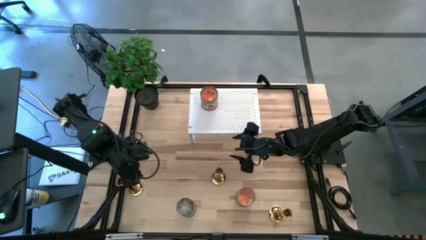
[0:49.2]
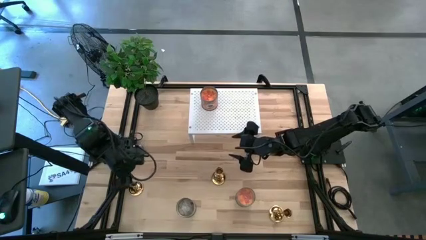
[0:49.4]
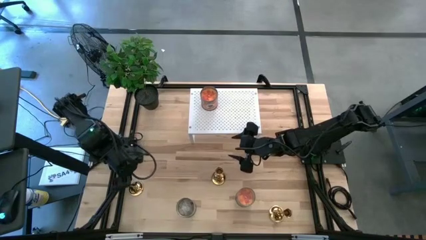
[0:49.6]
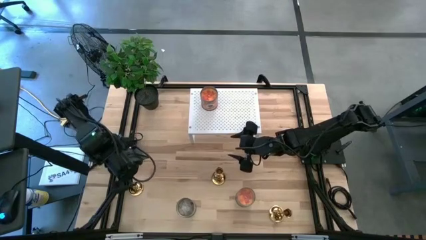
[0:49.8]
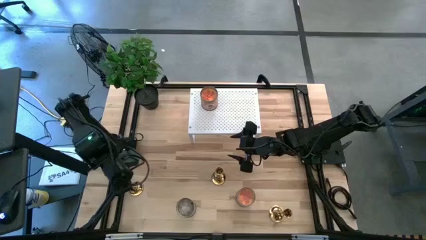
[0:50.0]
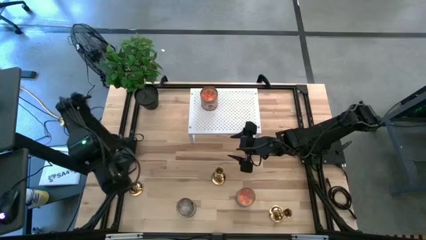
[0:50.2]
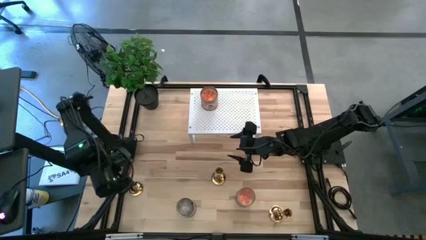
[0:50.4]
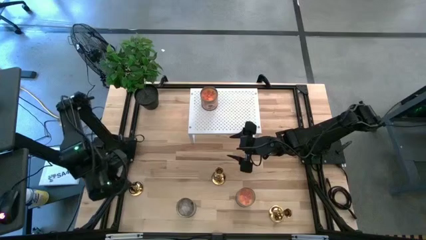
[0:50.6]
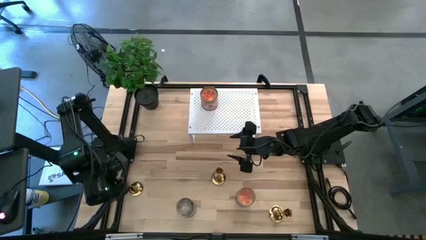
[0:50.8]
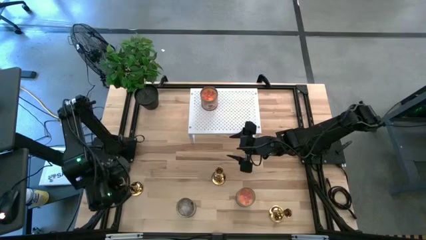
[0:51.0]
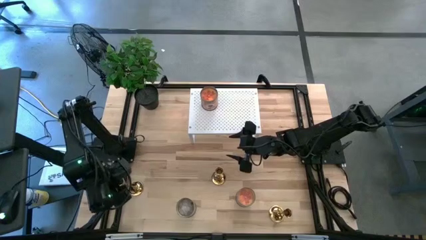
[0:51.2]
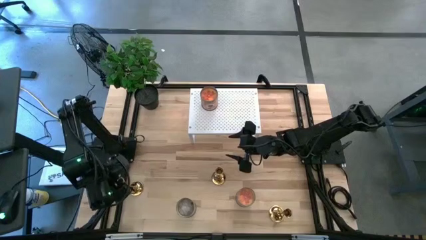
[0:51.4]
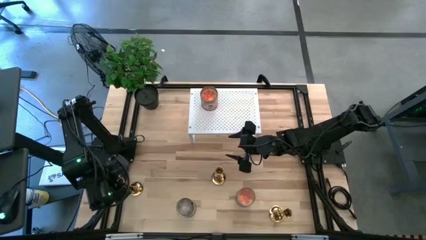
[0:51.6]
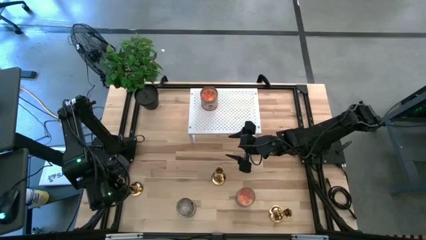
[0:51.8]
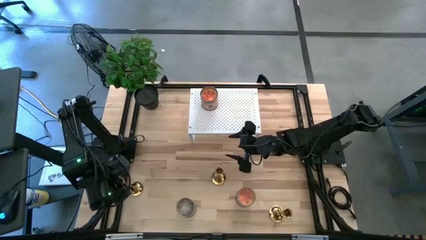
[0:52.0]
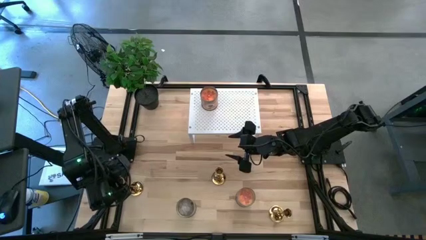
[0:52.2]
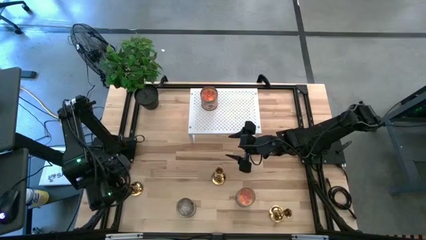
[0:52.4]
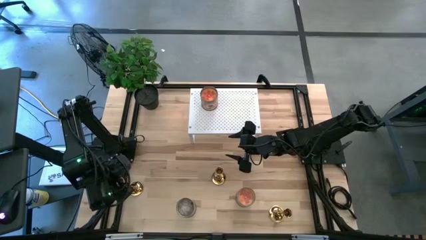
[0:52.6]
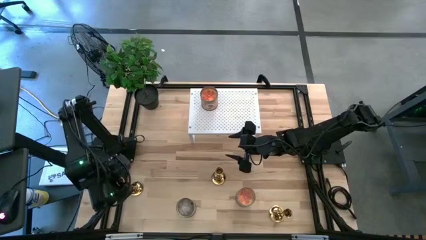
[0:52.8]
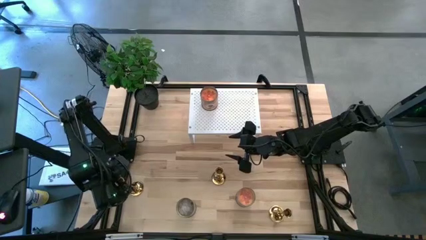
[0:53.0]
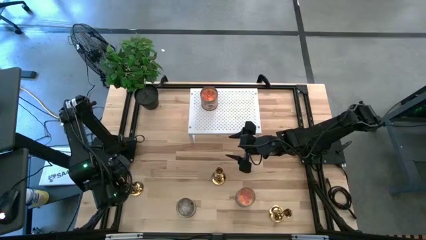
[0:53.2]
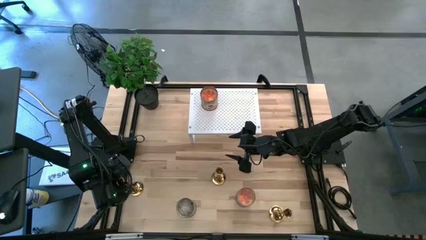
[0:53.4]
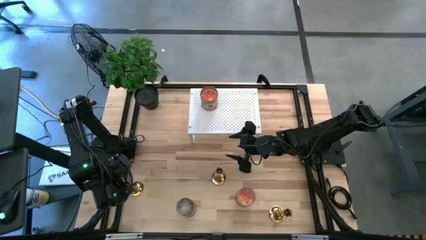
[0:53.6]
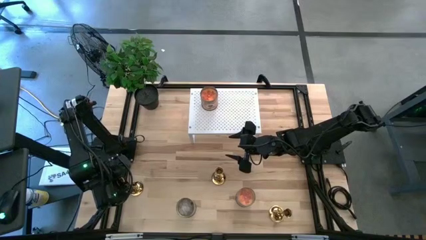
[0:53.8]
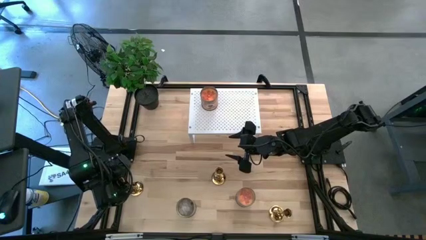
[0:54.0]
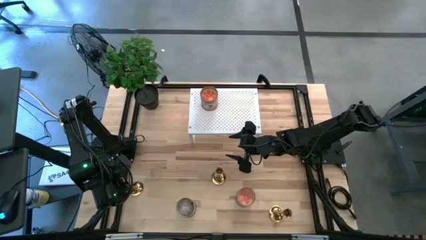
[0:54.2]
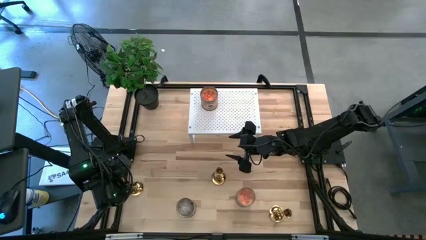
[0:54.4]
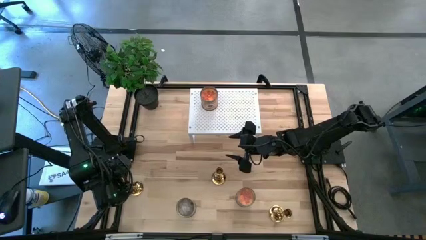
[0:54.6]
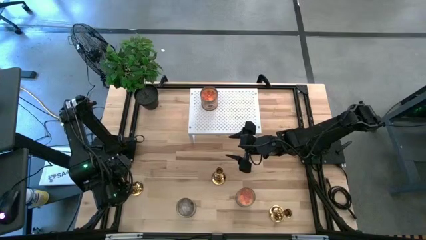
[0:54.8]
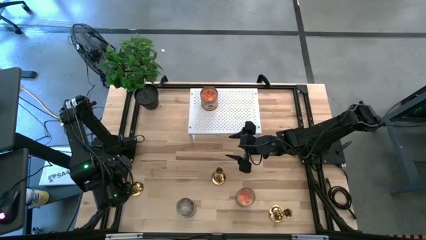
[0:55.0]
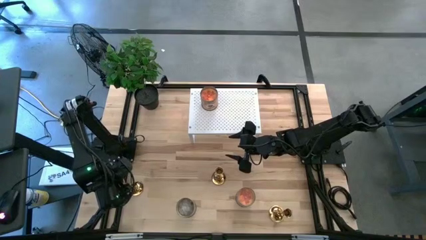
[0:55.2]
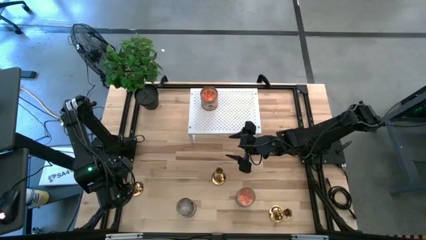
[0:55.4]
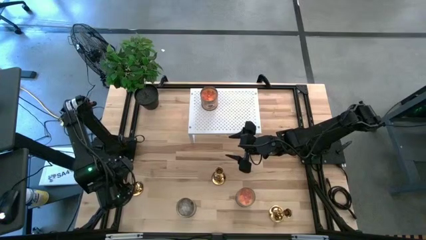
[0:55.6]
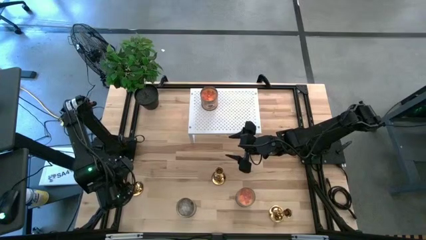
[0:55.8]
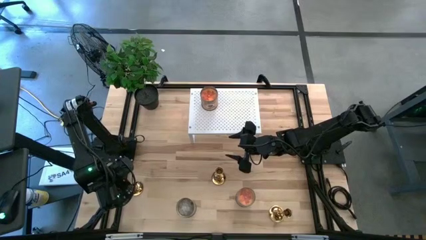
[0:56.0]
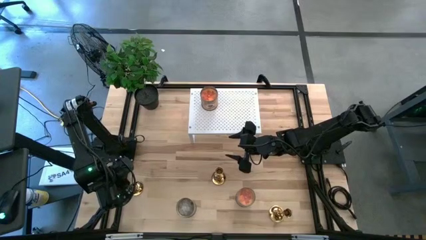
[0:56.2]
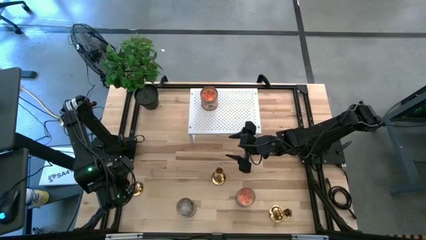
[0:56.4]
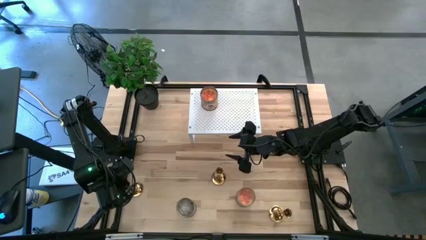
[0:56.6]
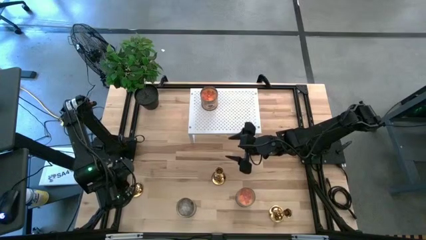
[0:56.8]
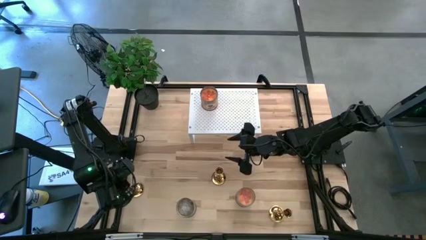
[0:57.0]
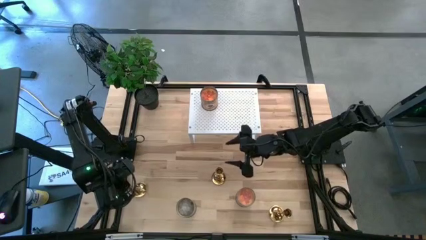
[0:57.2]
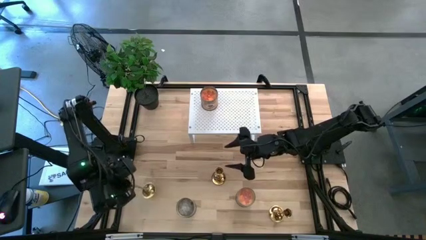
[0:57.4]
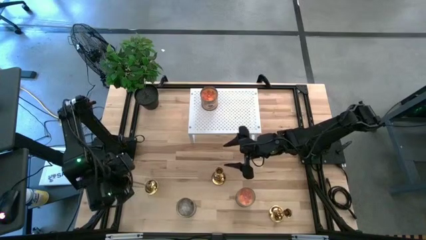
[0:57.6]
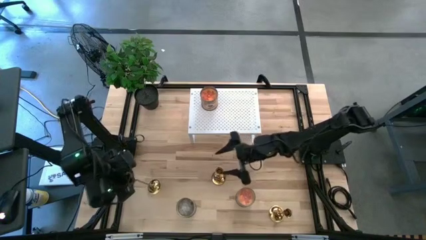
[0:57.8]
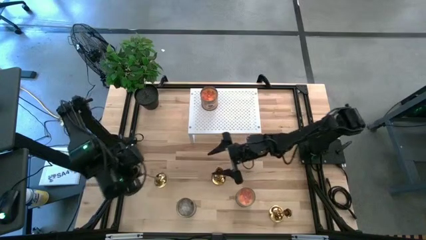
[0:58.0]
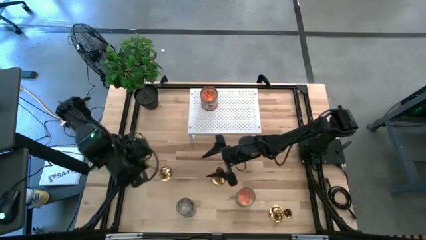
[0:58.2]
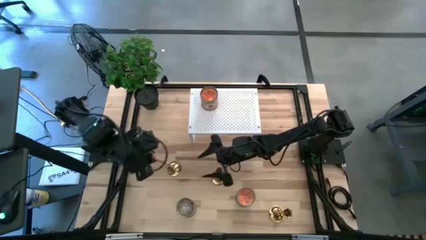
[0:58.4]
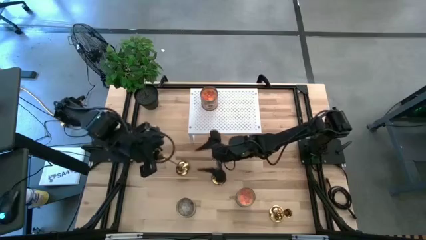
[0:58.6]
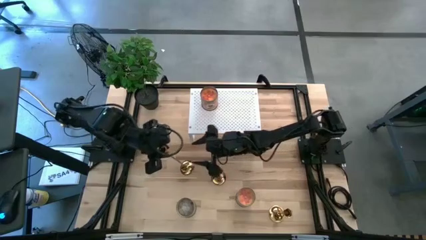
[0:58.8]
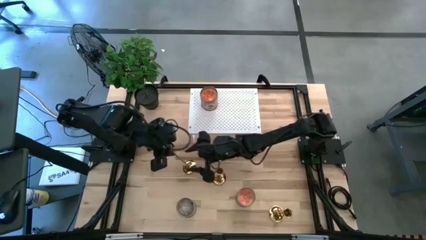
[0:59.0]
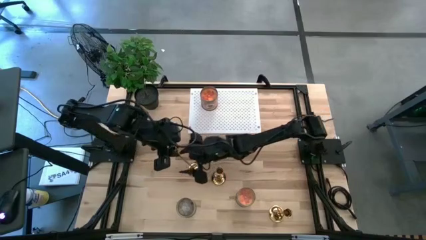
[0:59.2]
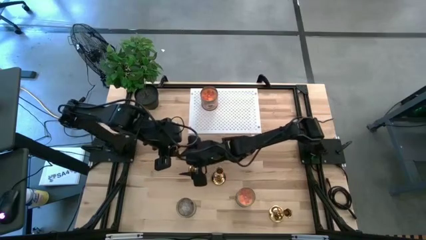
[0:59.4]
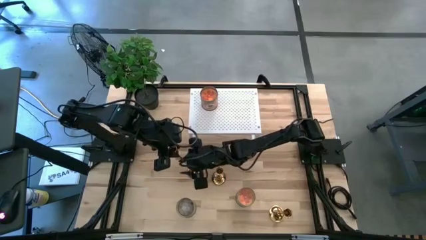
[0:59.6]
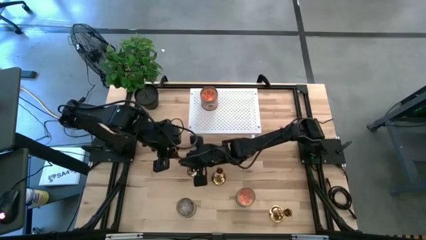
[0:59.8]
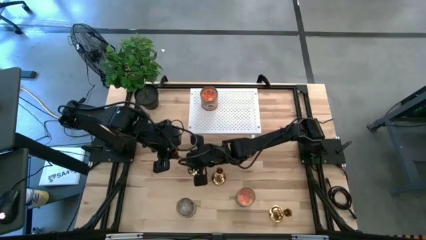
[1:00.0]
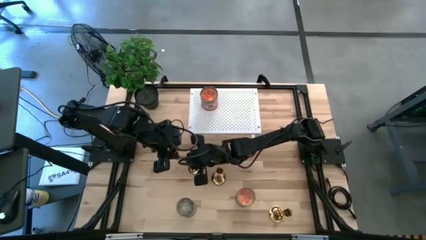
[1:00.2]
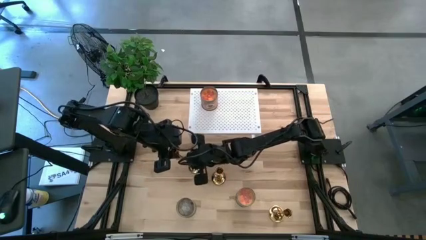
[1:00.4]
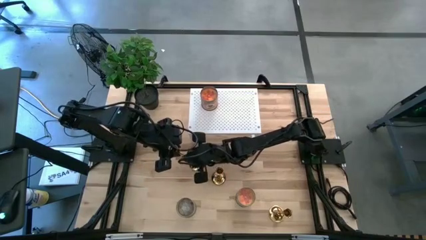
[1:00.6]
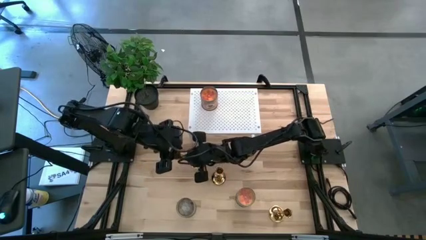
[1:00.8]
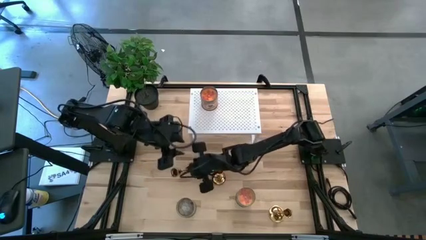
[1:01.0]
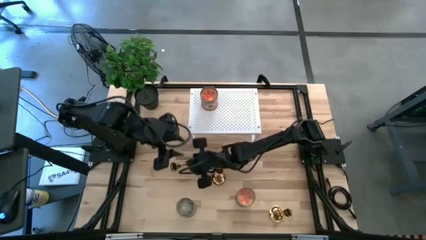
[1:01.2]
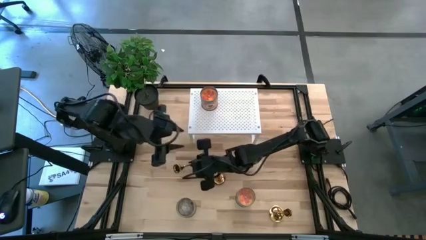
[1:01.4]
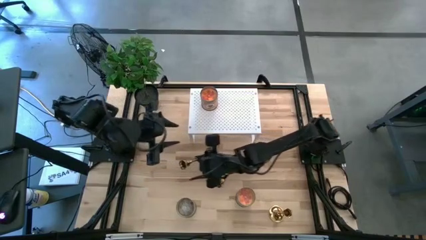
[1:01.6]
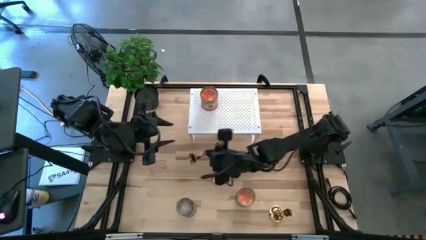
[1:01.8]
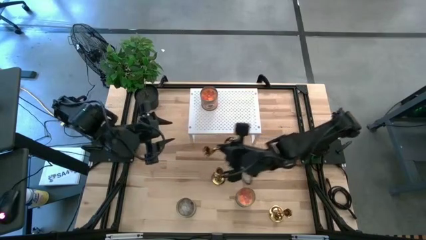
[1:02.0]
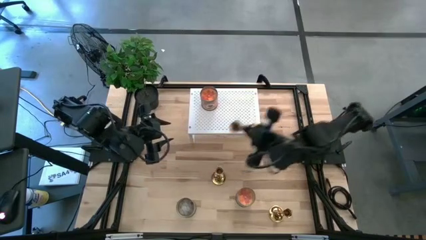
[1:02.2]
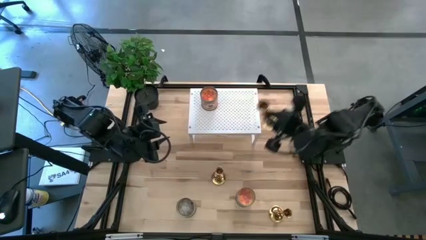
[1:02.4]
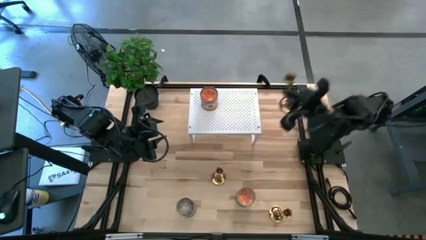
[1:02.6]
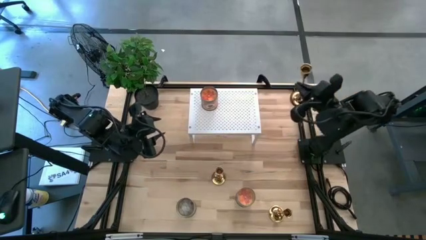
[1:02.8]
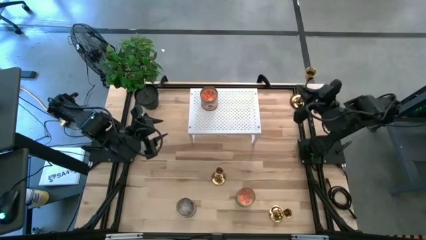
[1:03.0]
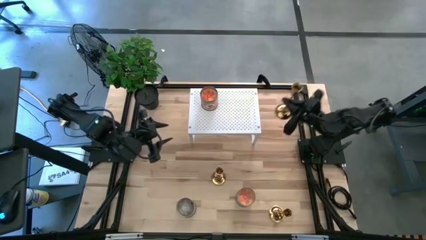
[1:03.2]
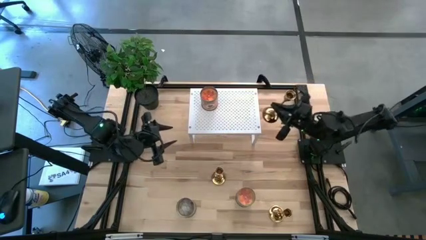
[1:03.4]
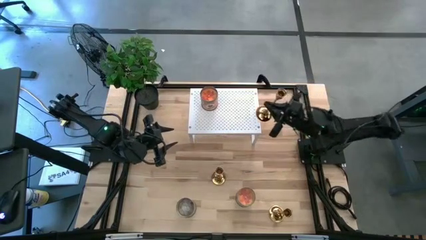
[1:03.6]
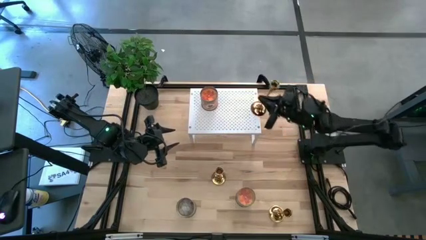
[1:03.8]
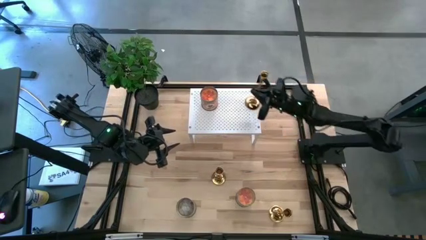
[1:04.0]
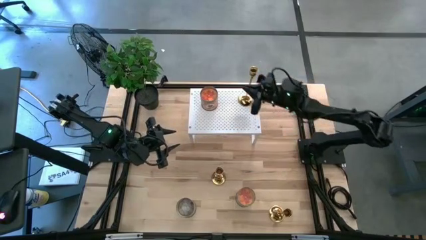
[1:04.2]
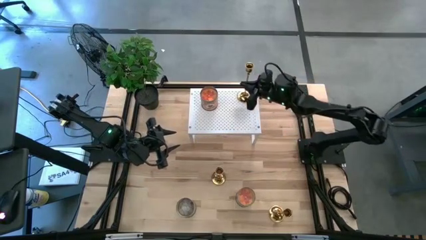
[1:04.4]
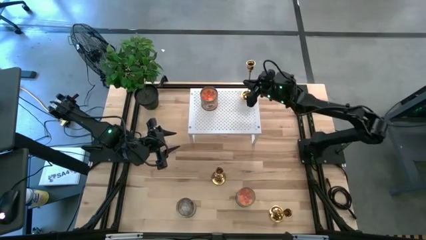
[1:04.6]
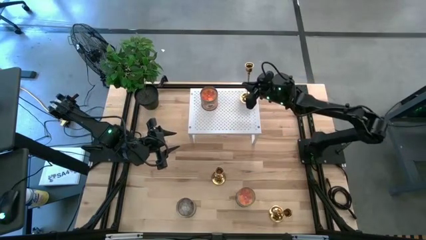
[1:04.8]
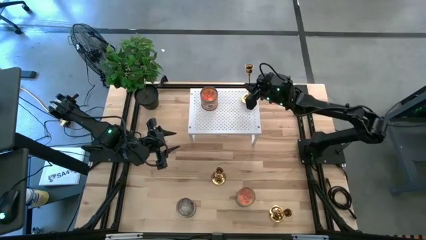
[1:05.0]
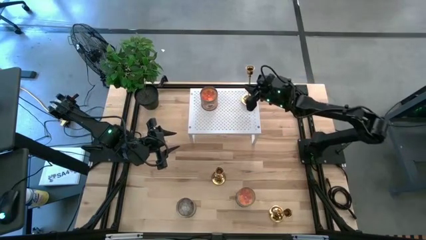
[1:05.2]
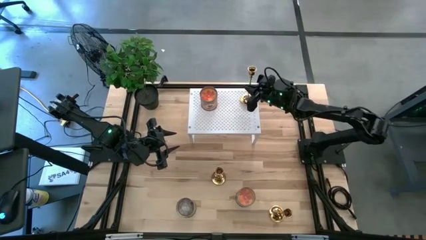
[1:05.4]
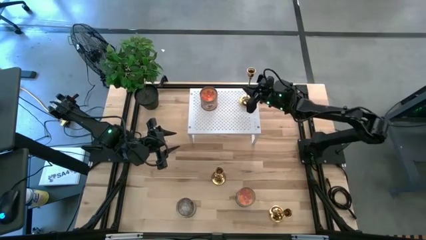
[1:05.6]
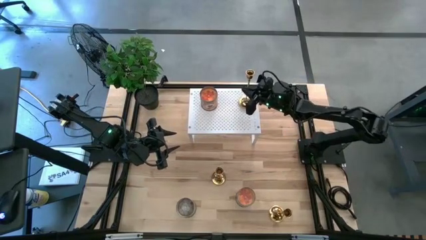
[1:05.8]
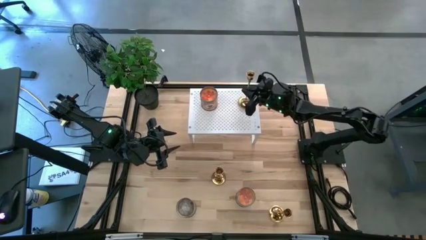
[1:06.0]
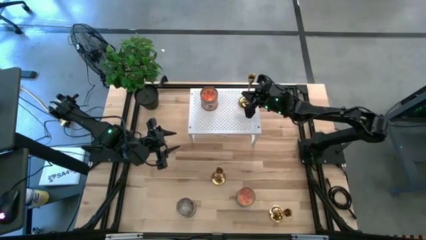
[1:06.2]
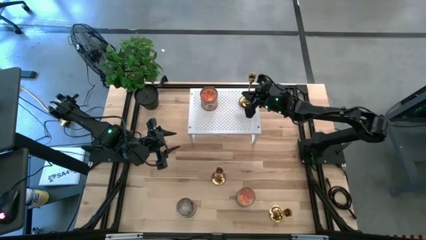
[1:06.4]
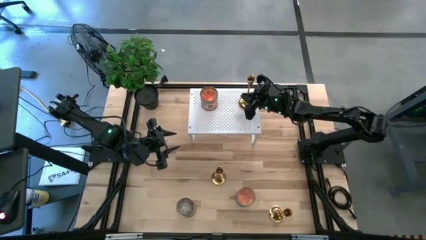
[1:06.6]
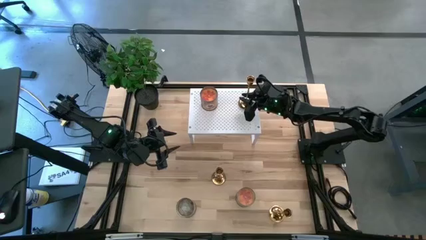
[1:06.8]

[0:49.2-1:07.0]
Task: Pick & Place candle stick holders
Put the left gold candle holder on the shelf
